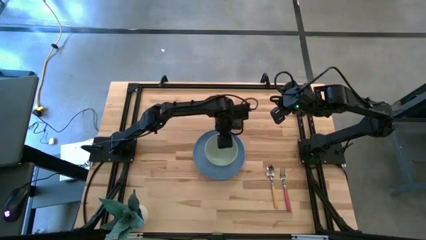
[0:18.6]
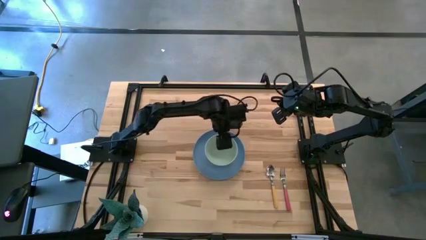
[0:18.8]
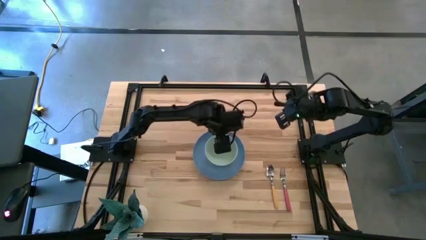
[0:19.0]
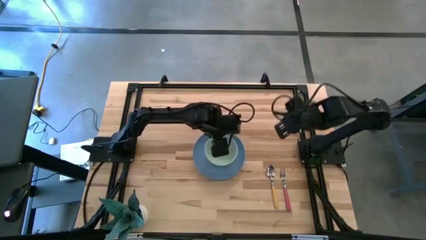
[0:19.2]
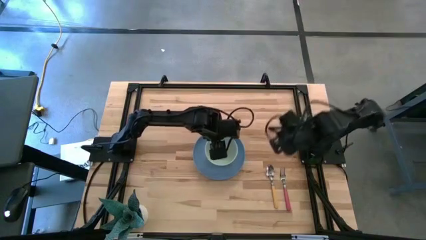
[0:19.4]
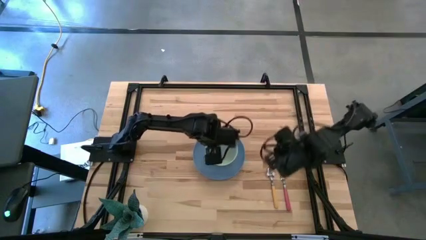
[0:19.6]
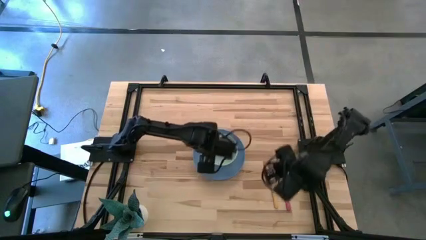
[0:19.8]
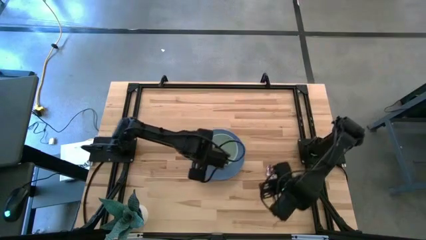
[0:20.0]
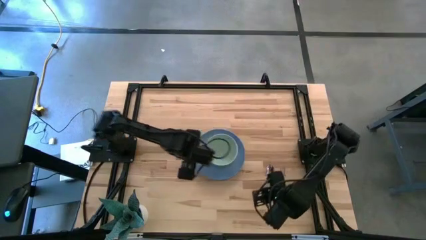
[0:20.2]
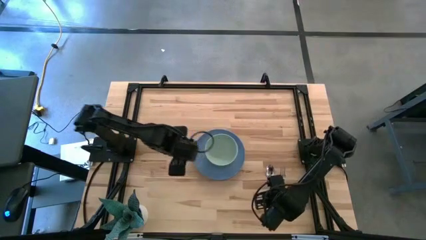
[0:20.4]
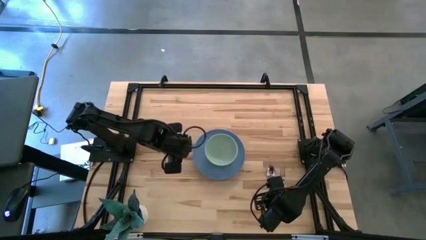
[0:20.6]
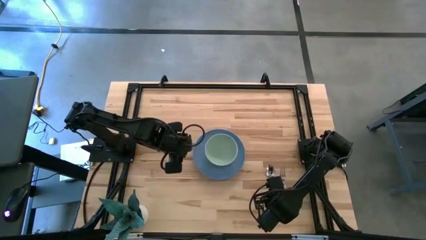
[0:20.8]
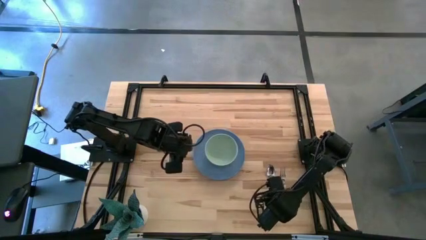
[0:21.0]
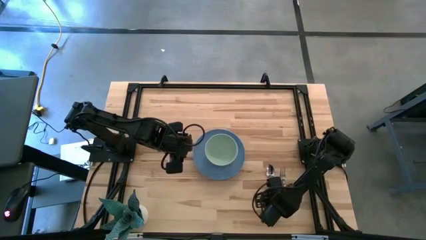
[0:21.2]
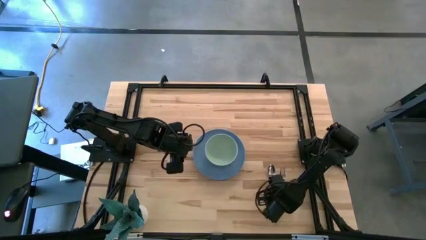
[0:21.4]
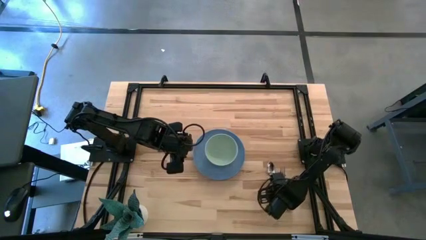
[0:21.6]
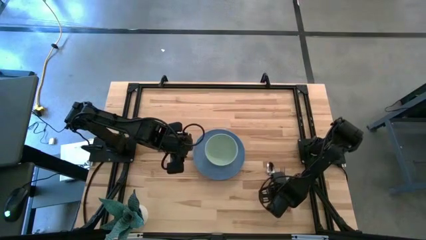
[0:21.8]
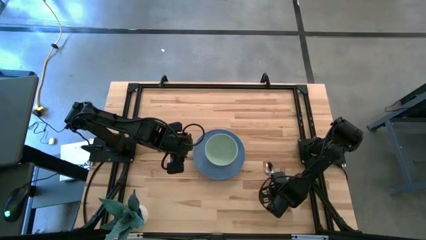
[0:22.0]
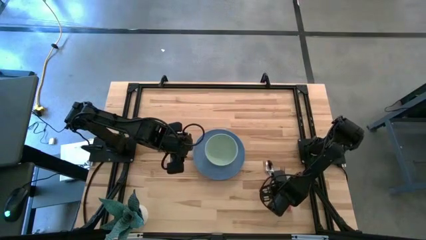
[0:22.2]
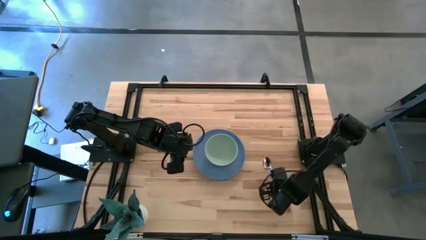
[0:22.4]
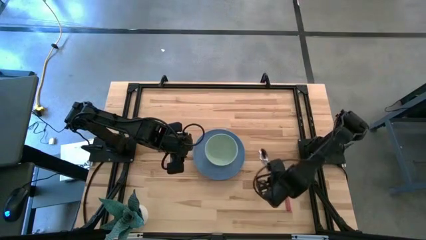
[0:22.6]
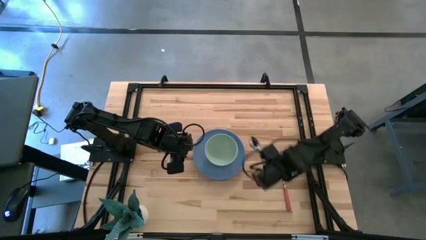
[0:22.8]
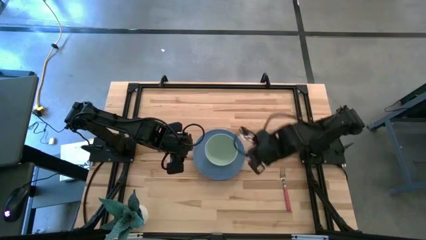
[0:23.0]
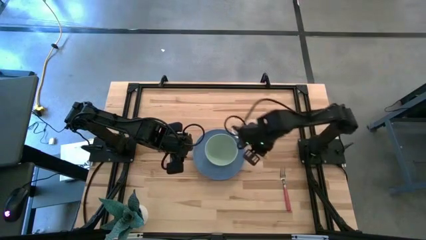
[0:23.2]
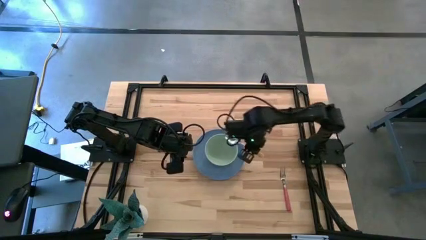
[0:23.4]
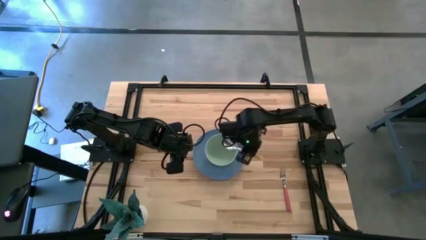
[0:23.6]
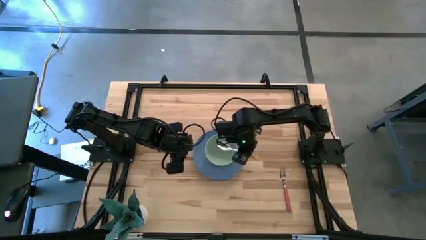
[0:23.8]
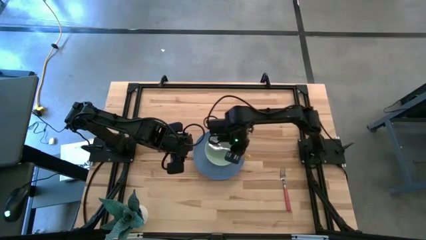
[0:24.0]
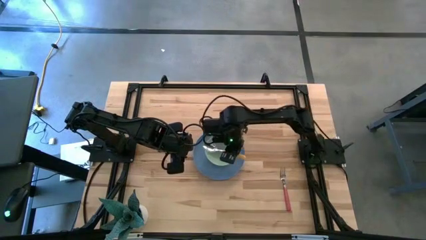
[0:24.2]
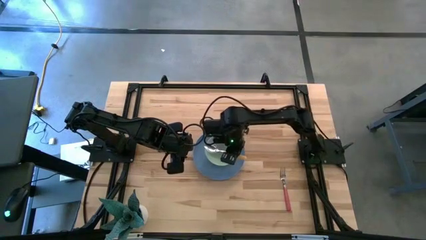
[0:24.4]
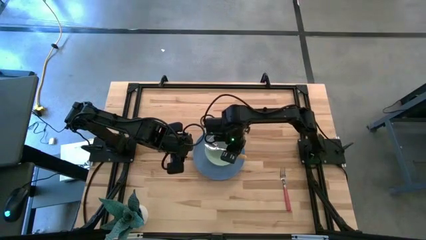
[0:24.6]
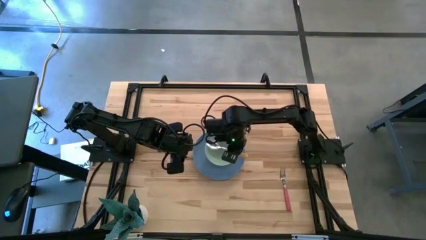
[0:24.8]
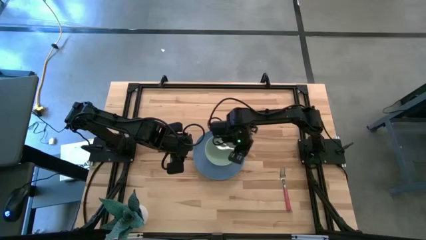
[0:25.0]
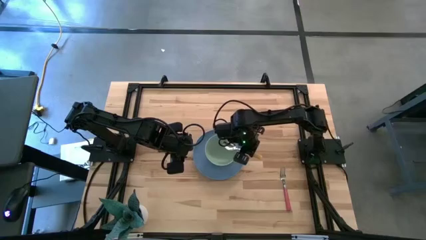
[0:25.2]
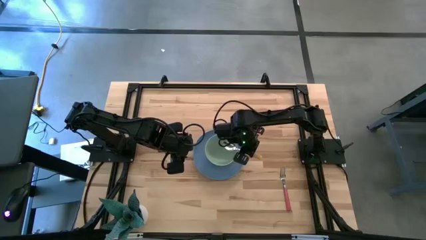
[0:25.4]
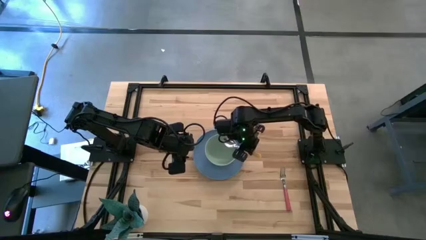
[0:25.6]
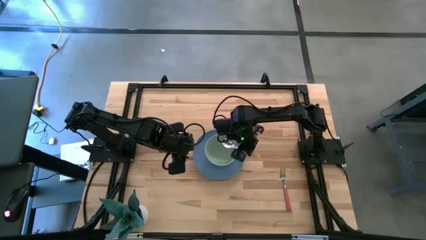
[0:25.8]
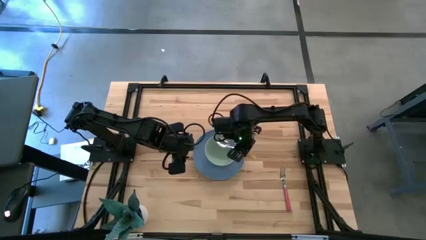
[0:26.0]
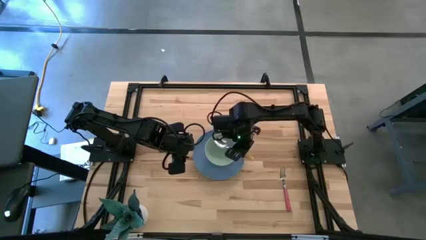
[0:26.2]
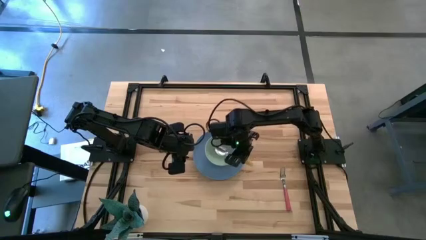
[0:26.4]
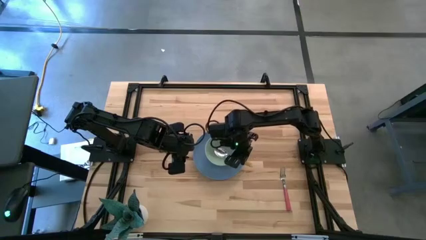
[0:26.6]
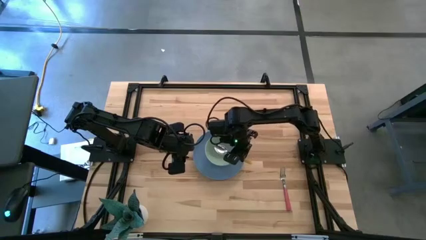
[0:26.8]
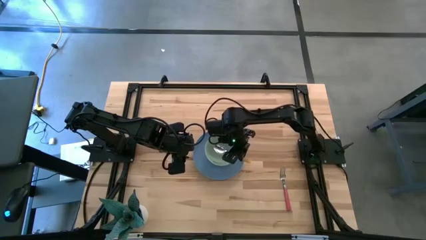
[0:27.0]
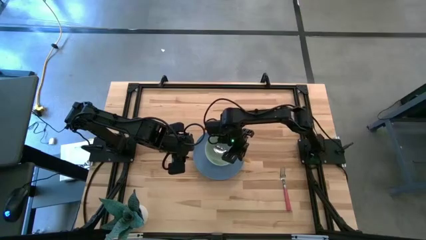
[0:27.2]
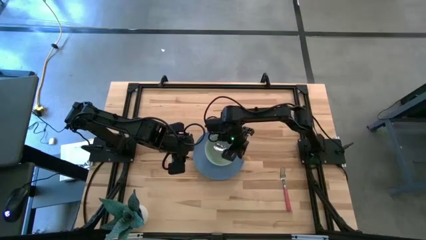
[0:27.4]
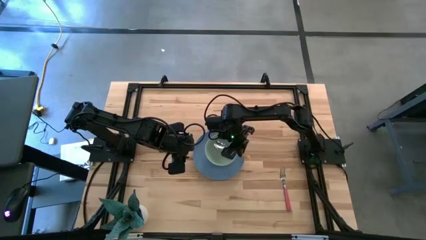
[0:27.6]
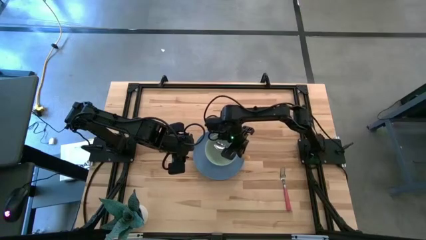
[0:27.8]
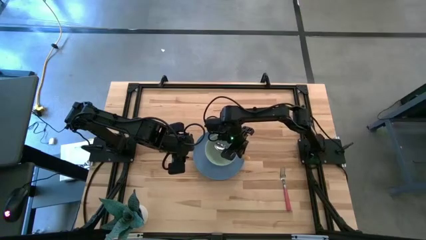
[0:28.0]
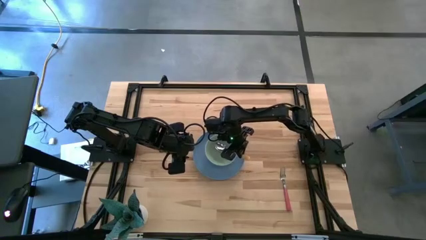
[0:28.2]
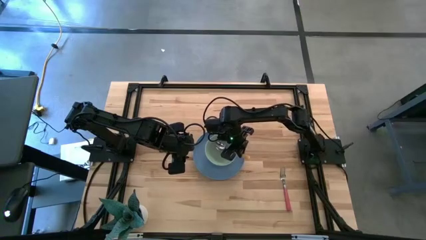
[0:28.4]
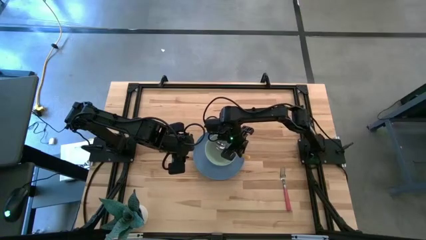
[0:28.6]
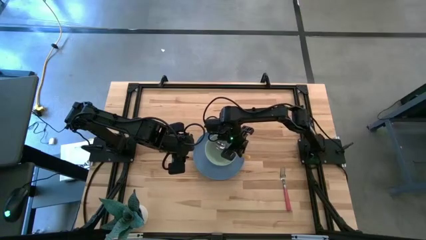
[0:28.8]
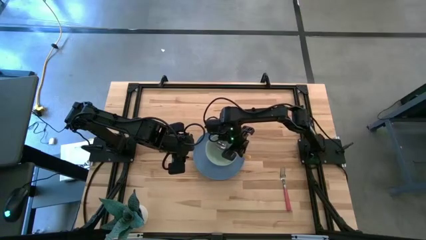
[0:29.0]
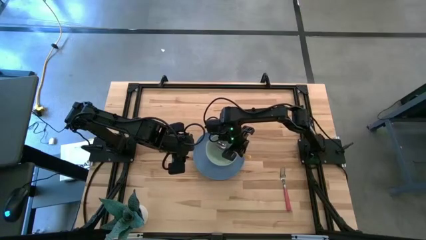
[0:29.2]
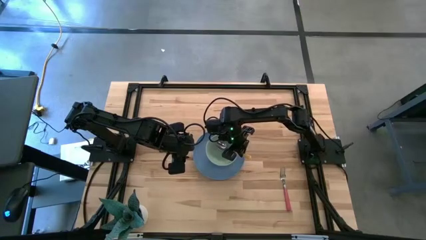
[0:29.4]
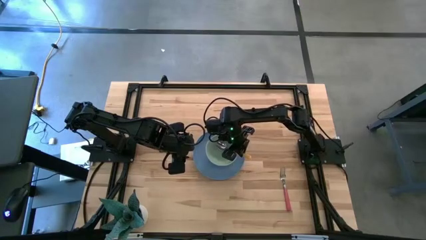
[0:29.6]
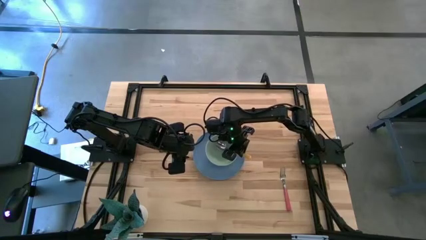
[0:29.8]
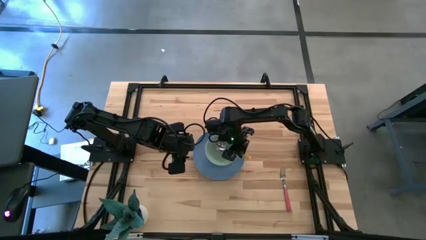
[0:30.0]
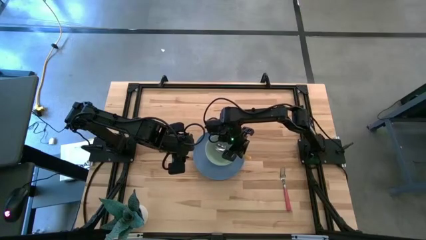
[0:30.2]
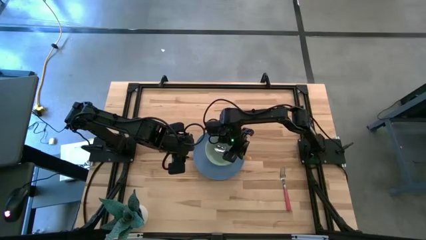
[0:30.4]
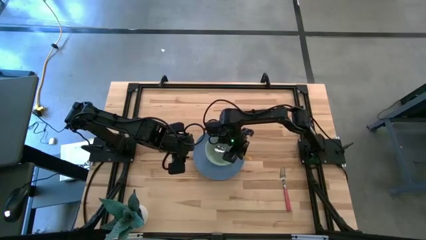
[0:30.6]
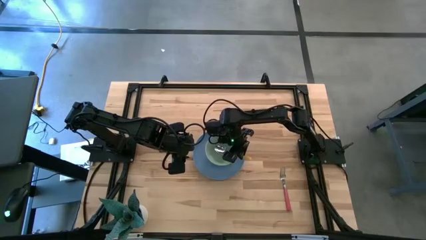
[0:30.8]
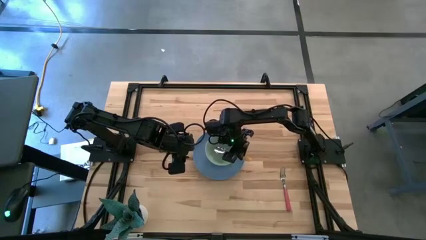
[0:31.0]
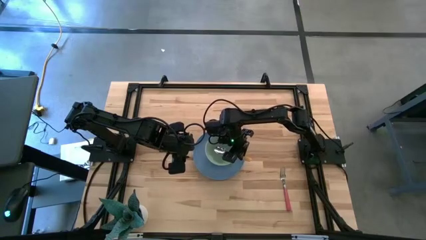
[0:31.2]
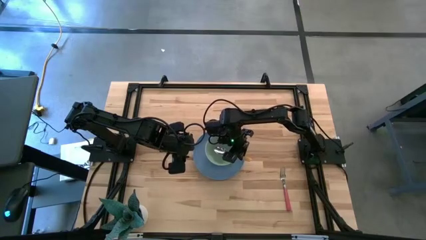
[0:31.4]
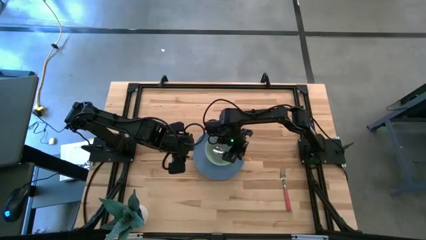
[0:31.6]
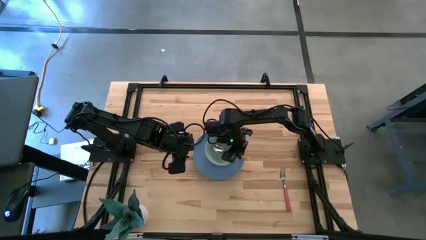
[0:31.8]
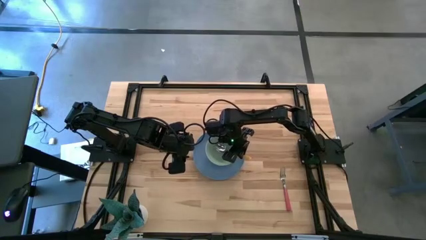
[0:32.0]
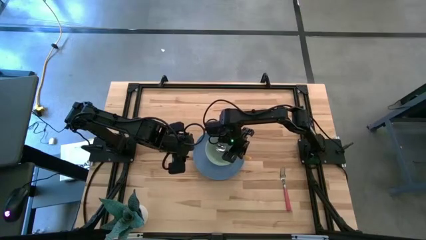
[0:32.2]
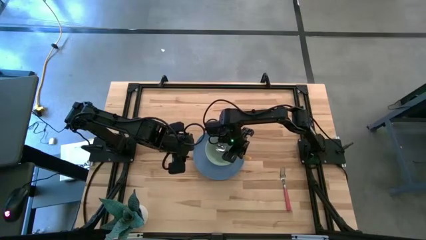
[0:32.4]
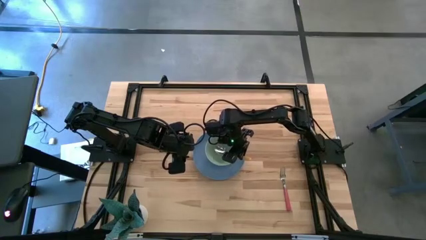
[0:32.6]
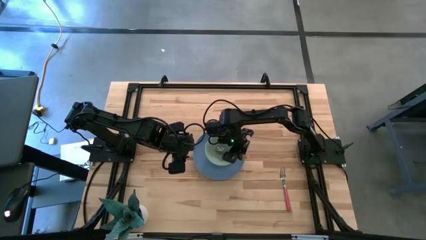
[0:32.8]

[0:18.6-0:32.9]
Task: Set table place
Put the yellow spoon into the green bowl
